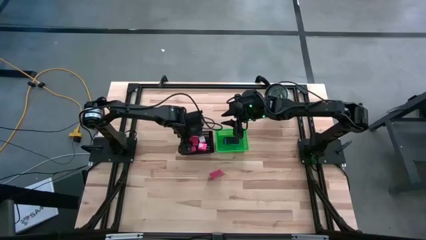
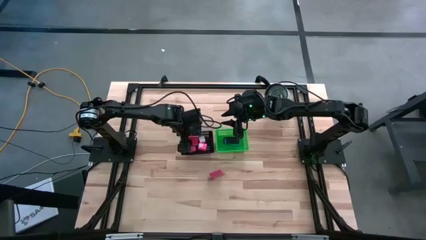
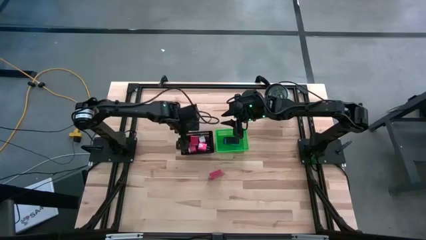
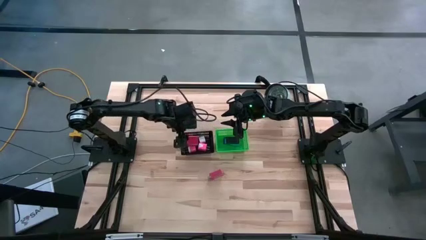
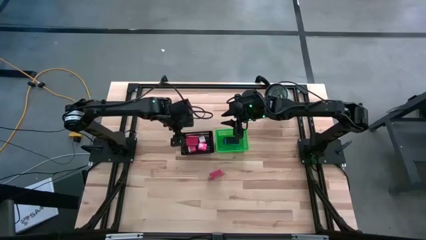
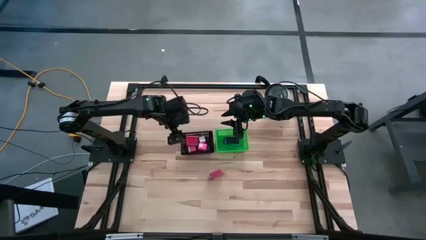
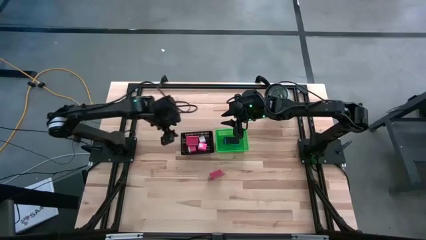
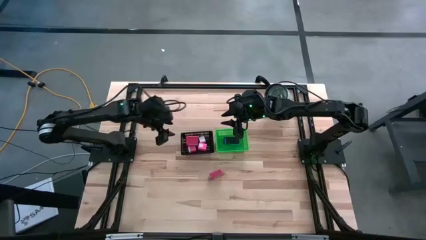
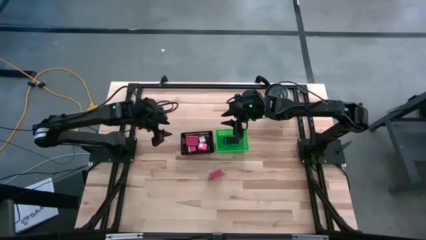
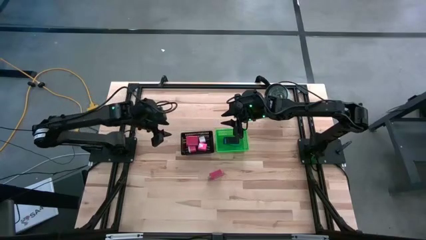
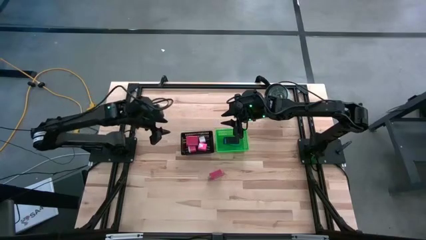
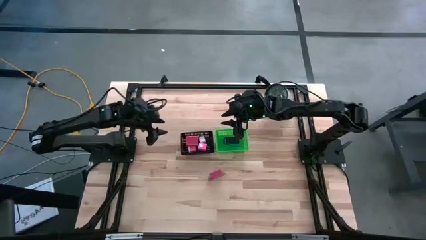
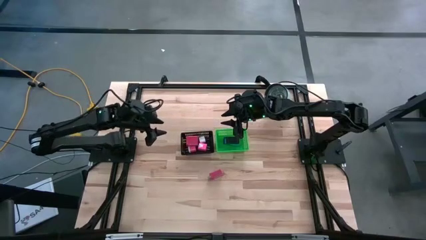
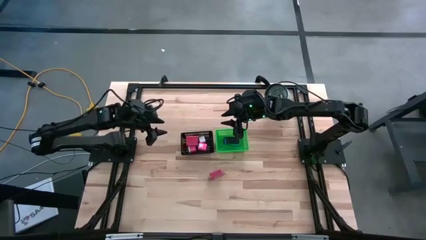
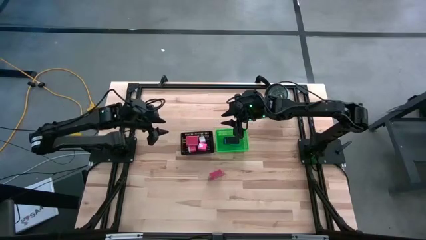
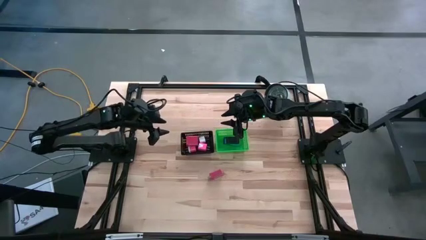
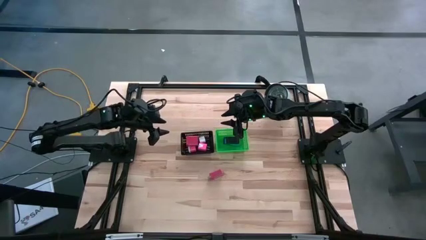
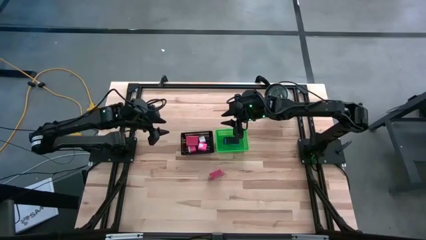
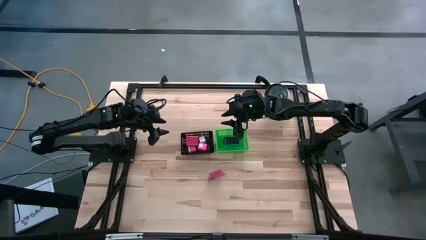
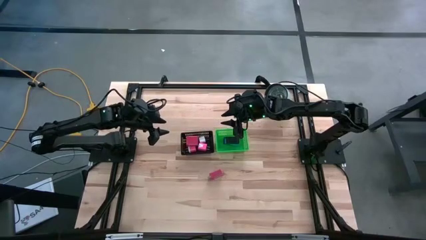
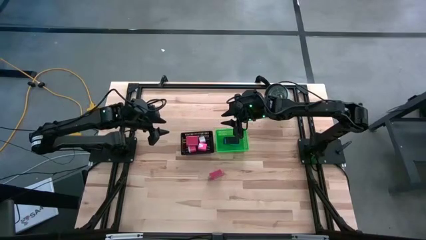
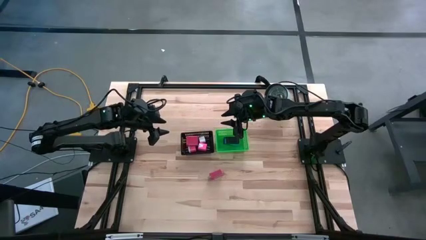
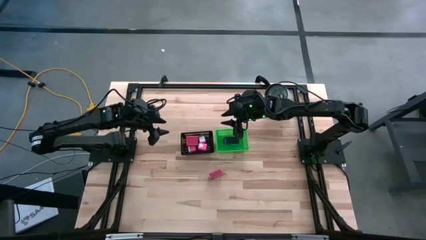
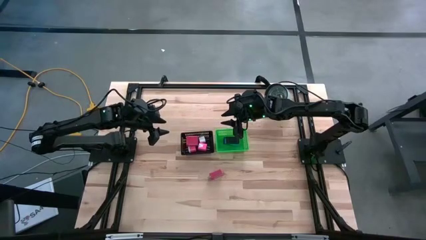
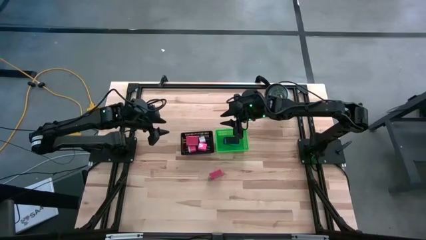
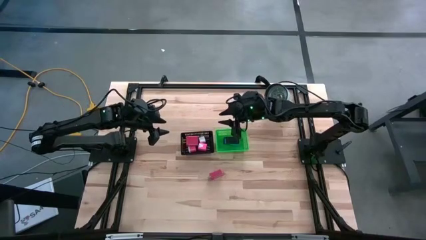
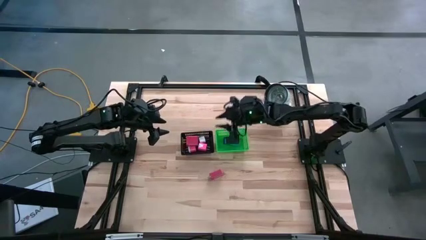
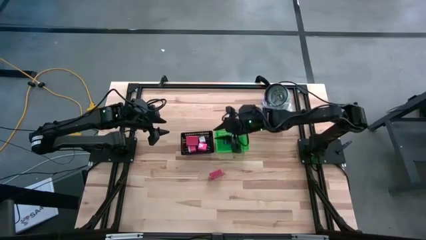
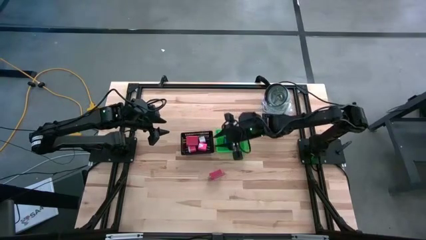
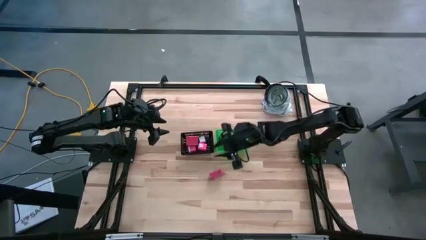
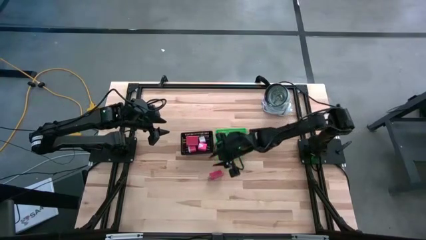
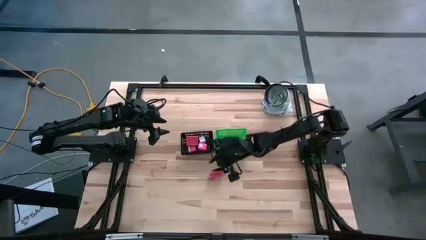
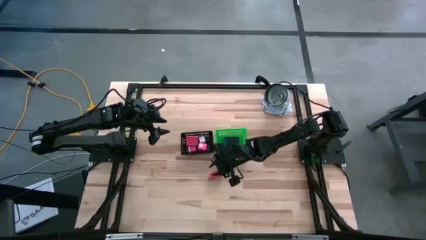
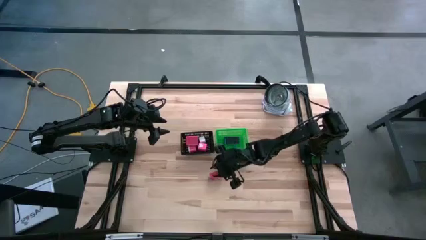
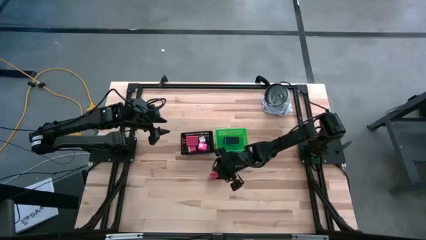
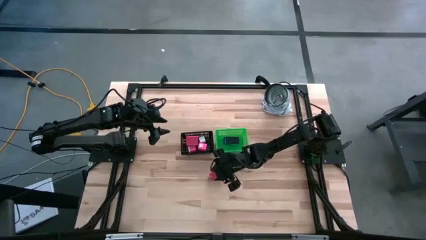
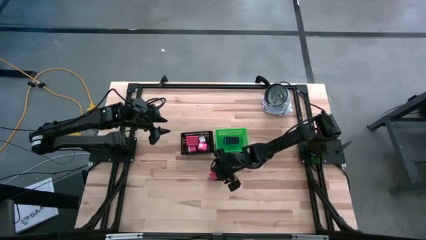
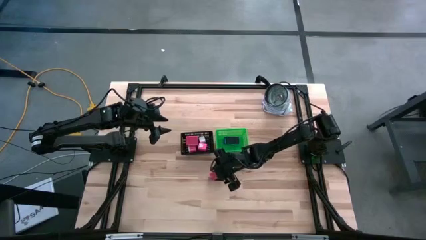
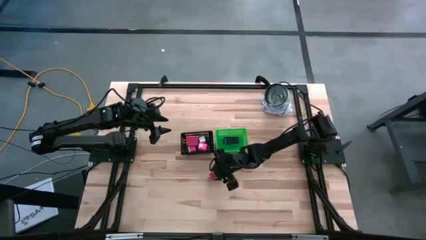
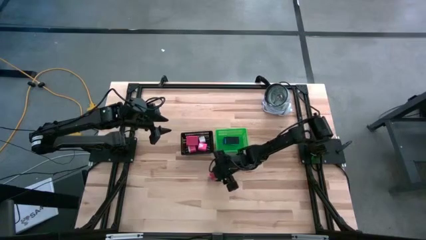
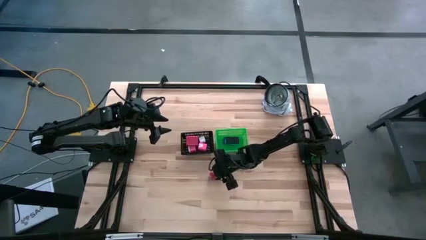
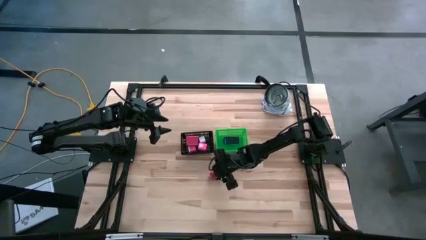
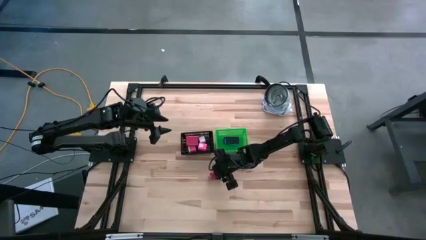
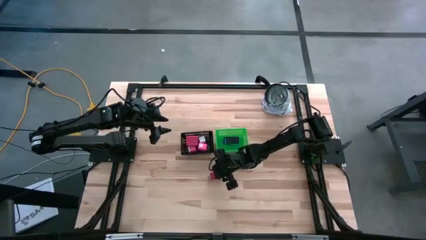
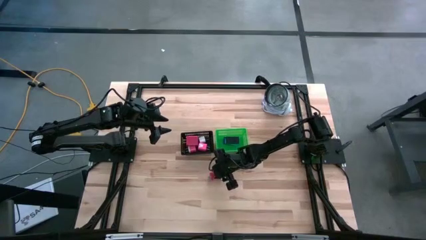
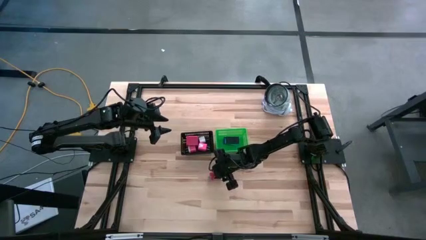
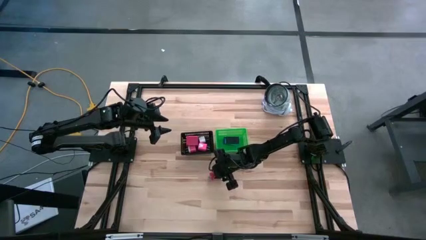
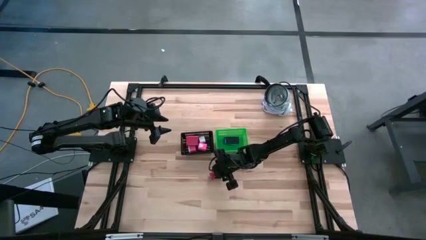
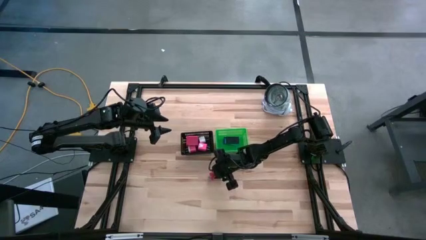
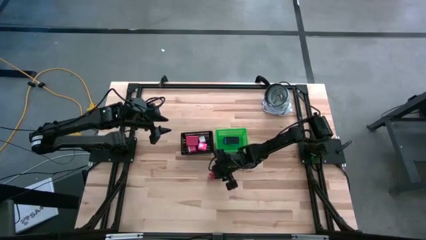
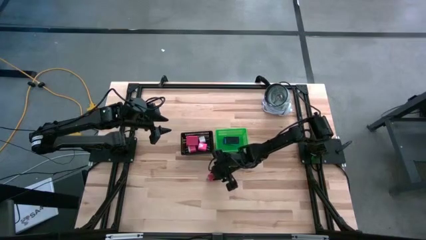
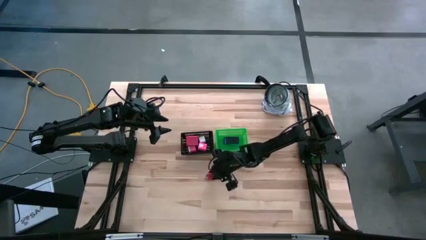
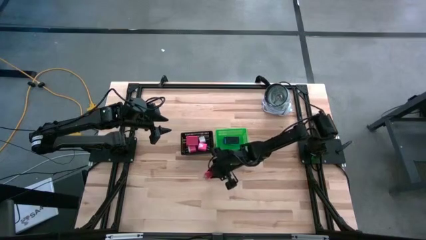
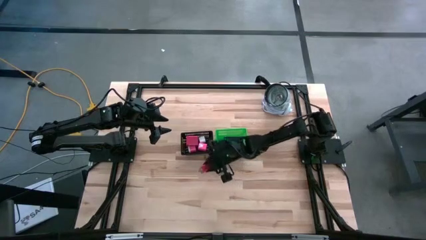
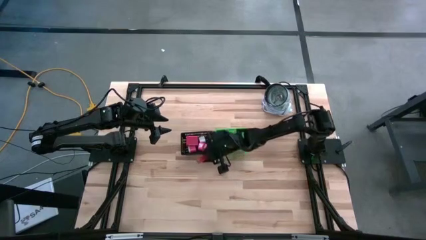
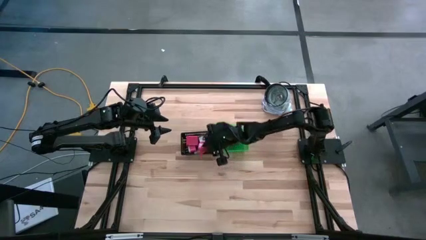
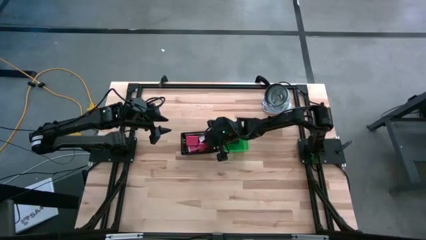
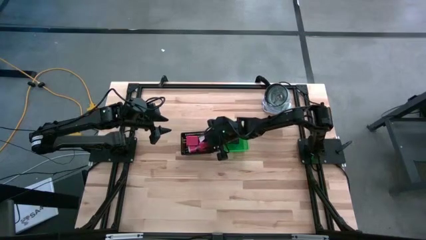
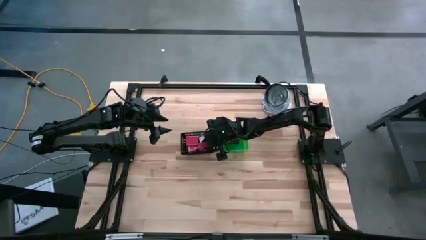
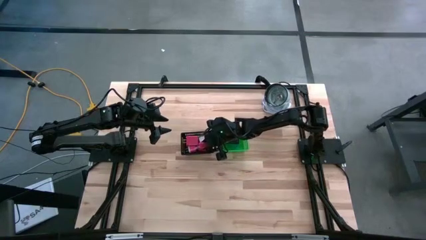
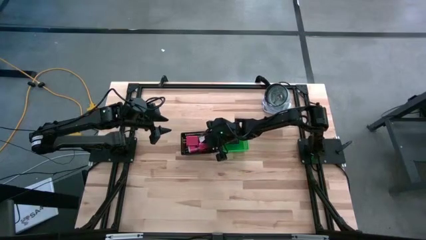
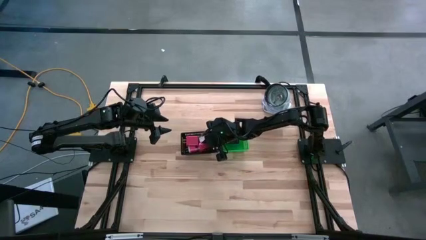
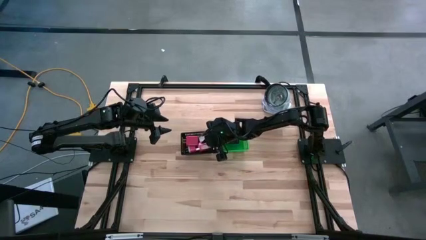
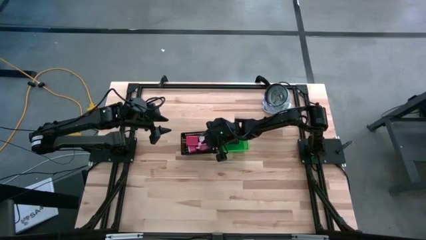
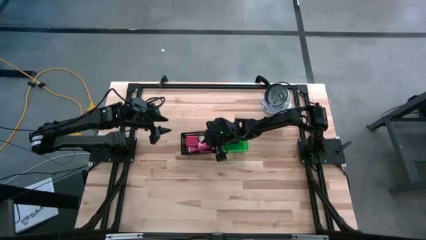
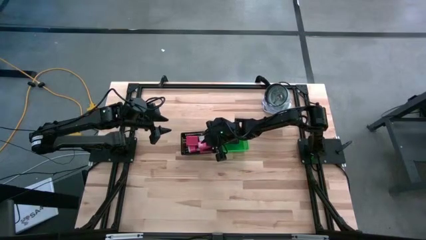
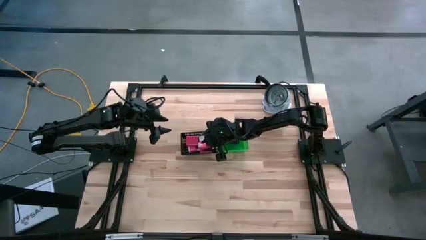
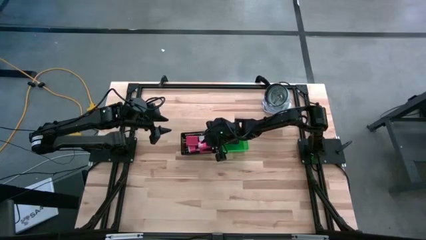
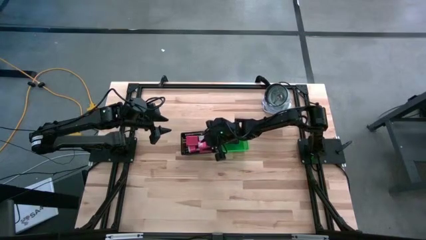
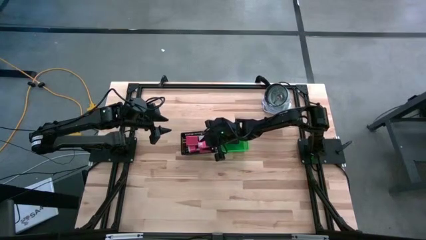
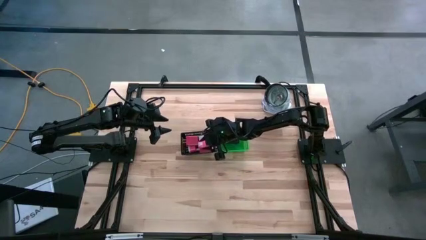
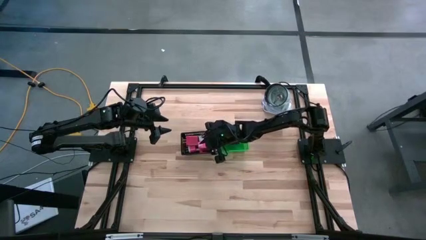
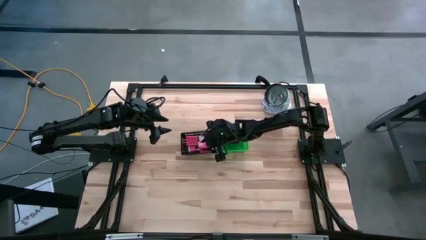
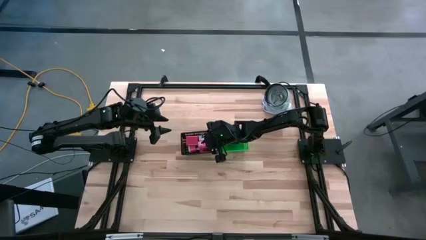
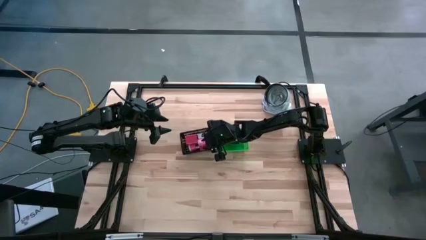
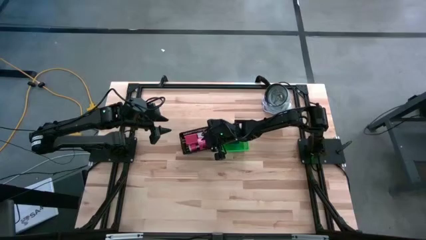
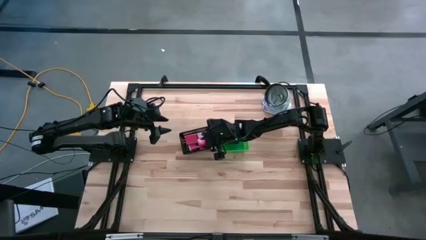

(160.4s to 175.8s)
Task: Pick & Place Office items
Put the red charger adapter into the black bin

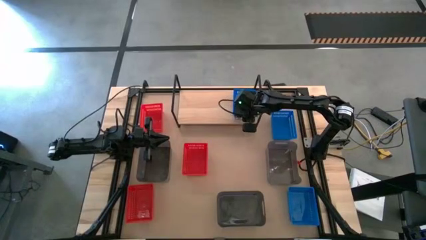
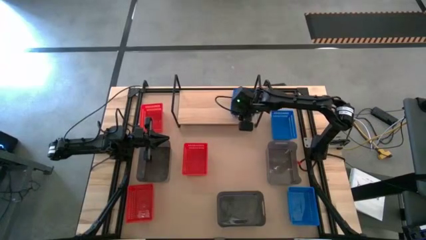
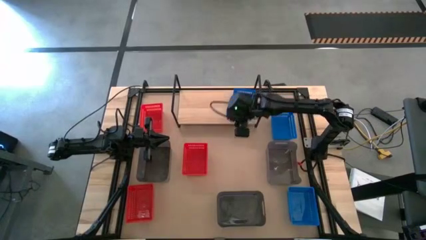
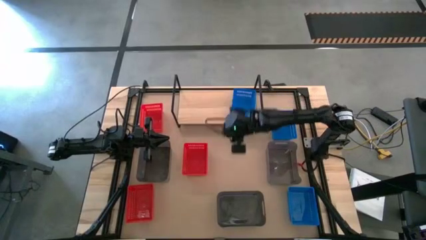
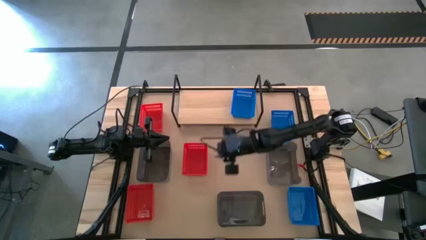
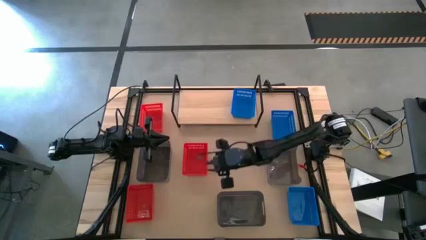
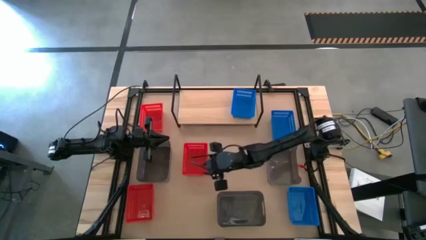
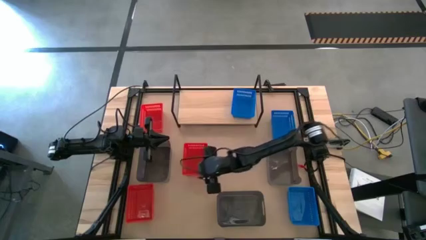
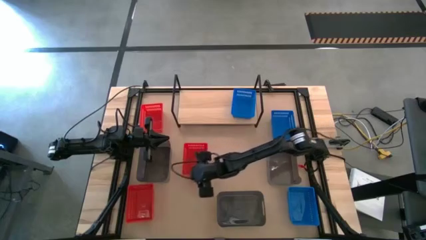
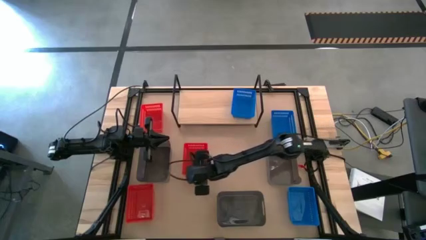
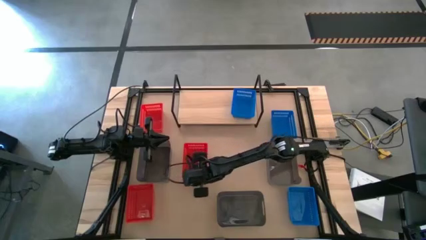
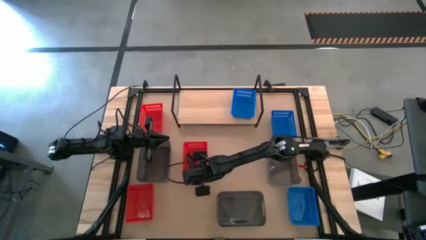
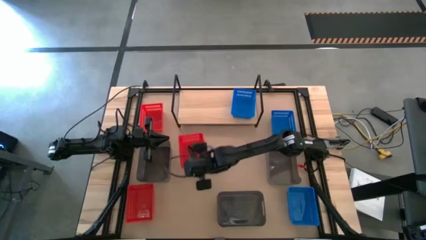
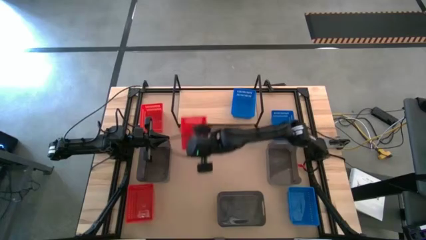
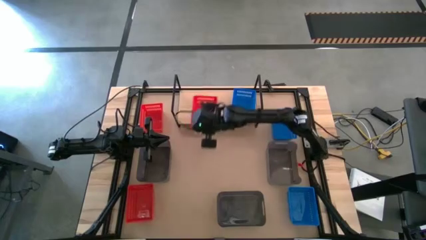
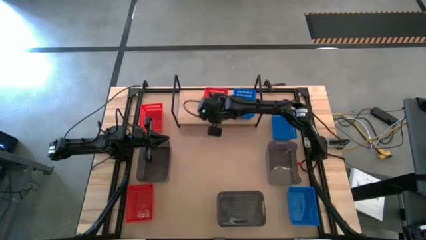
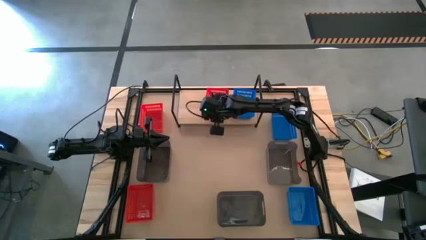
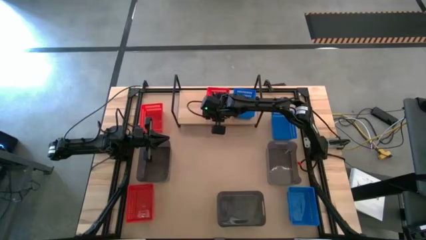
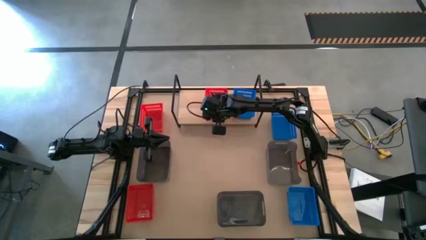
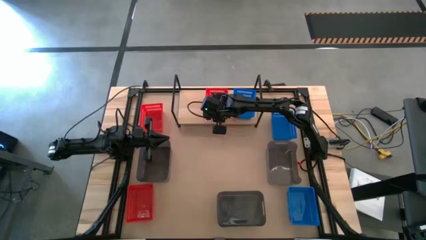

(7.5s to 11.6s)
Task: Stack baskets on shelf by color
Put the middle right red bin on the shelf
